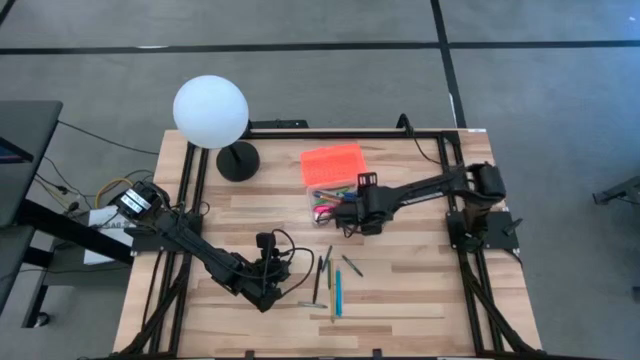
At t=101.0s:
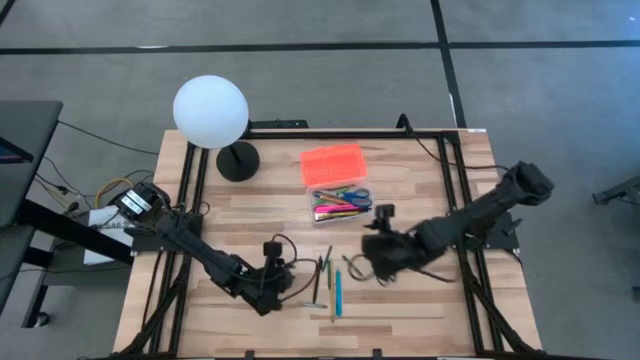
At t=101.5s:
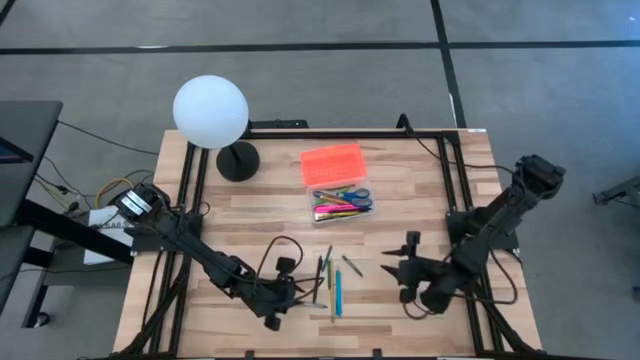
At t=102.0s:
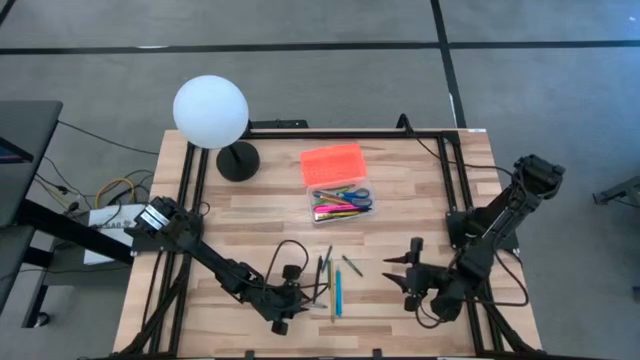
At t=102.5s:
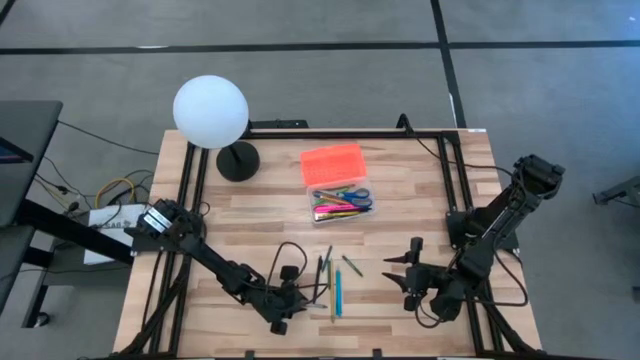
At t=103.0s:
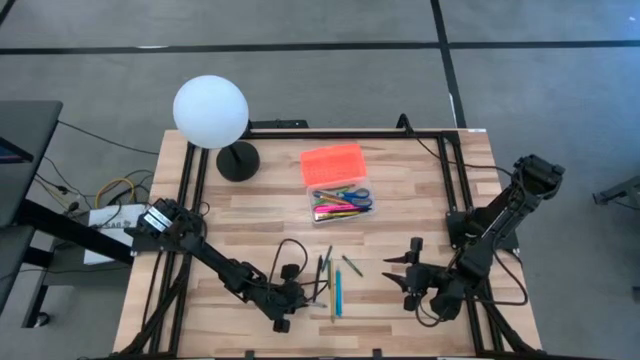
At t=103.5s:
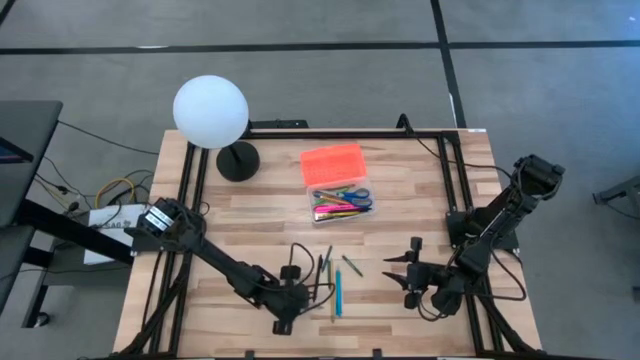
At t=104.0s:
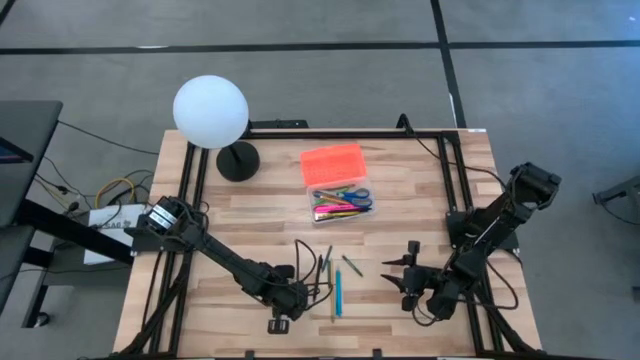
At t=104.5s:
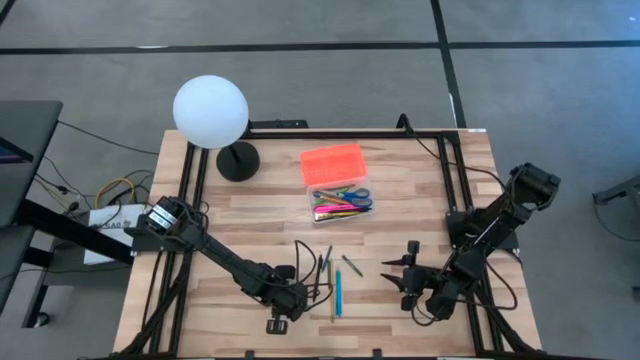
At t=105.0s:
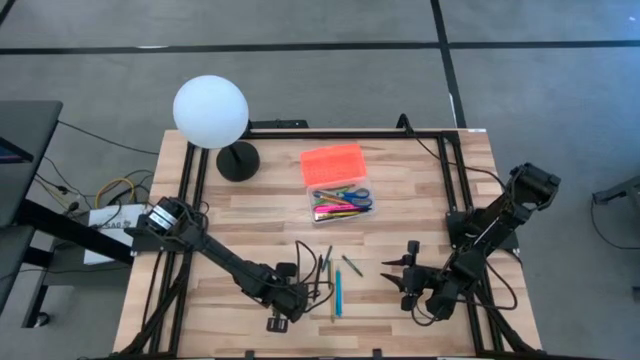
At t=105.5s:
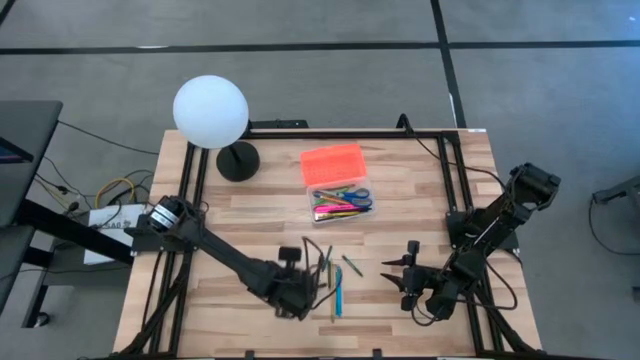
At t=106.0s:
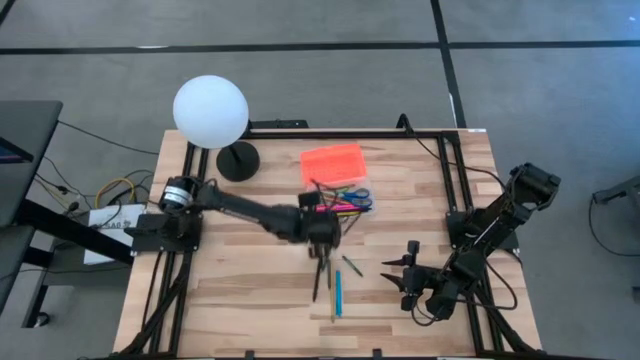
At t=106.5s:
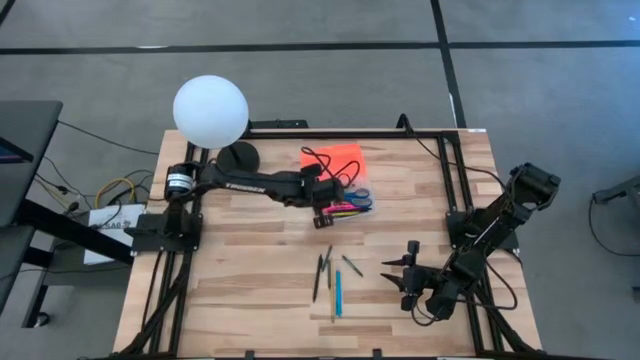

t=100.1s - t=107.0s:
Task: Pick & place school supplies into a supply box
Put the gray crayon into the orange supply box

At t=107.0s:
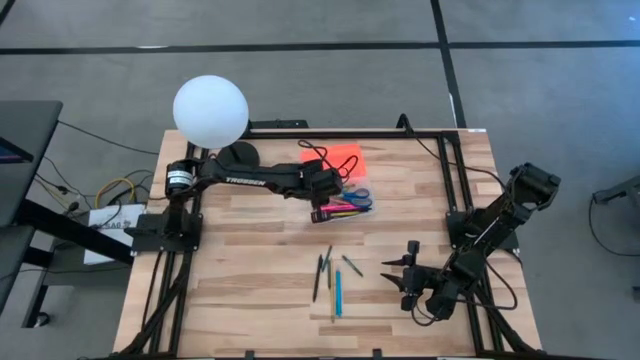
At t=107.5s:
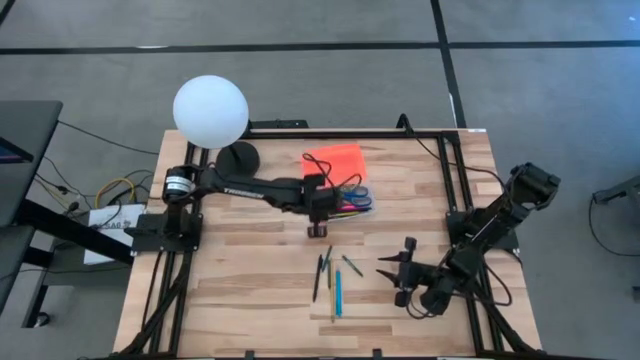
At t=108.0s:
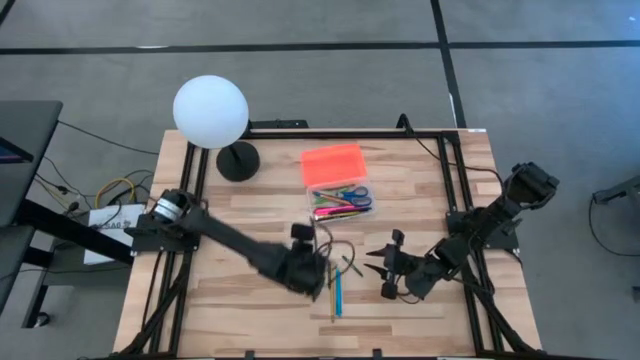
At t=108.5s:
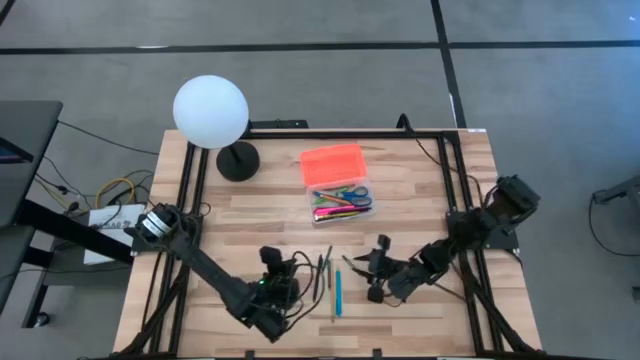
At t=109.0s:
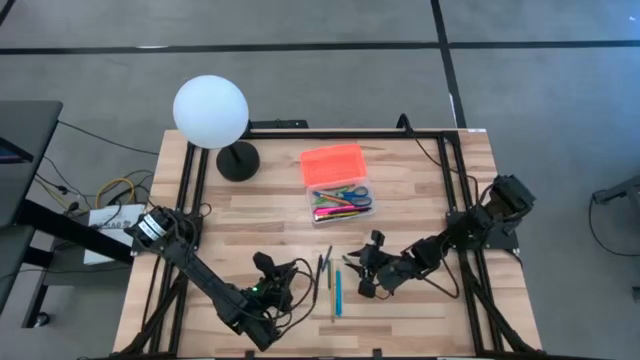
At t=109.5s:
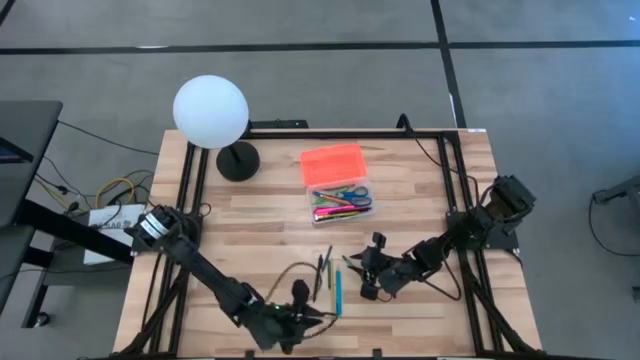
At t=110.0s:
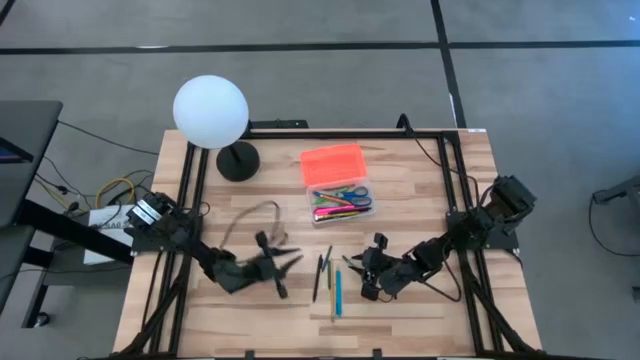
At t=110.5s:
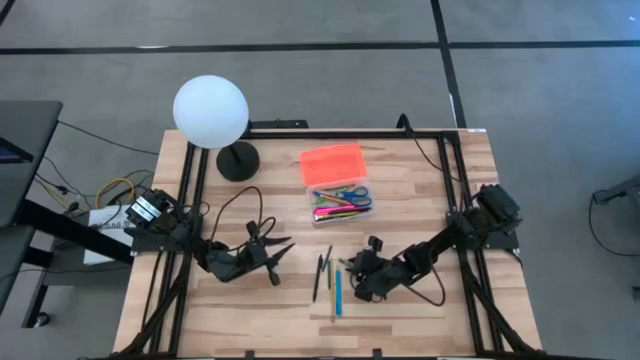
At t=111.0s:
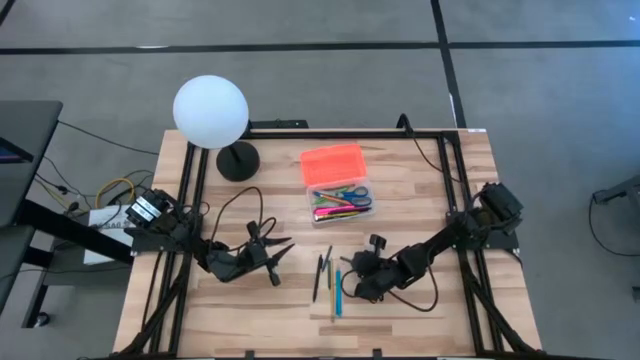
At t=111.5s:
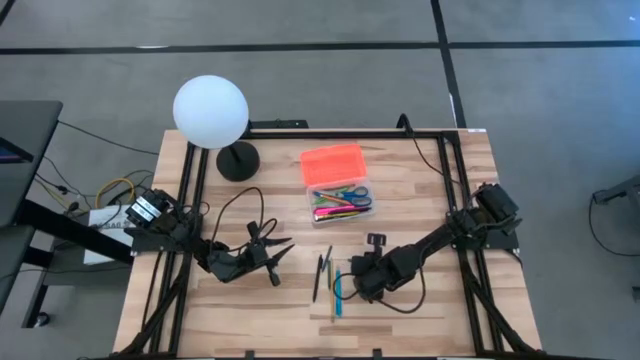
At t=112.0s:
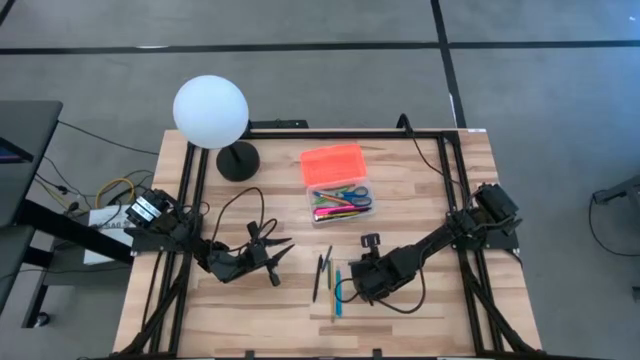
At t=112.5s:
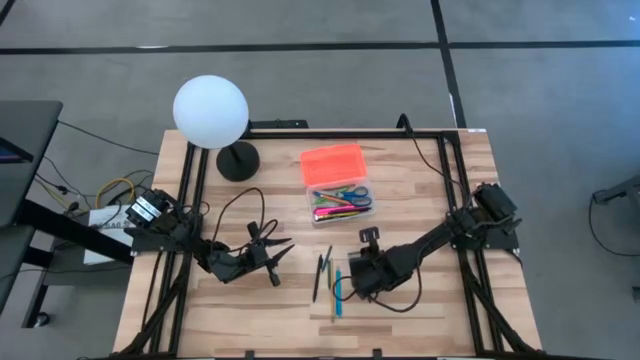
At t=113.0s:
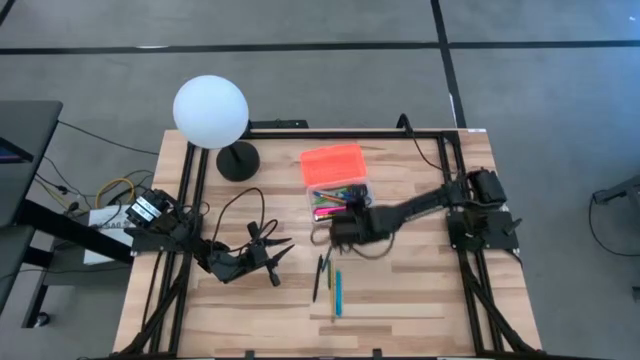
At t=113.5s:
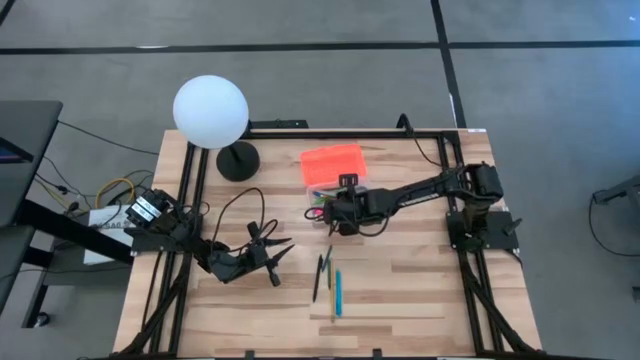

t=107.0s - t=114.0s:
Put the green crayon into the orange supply box

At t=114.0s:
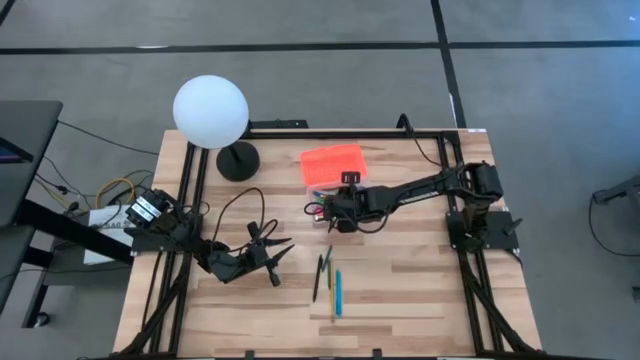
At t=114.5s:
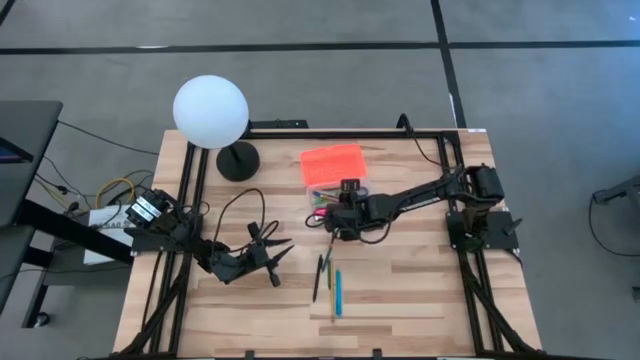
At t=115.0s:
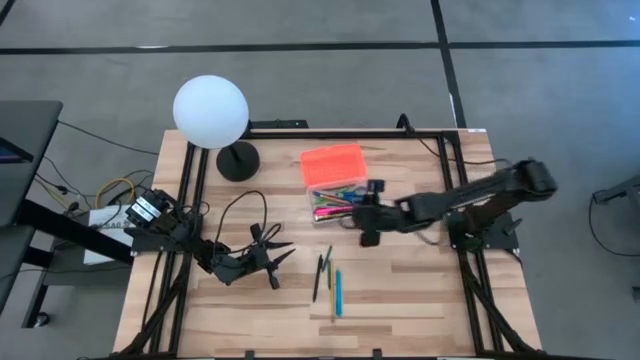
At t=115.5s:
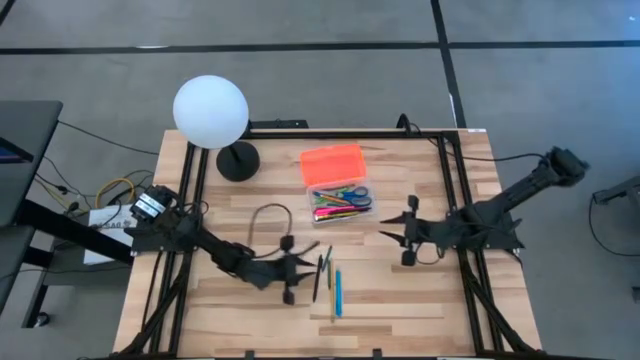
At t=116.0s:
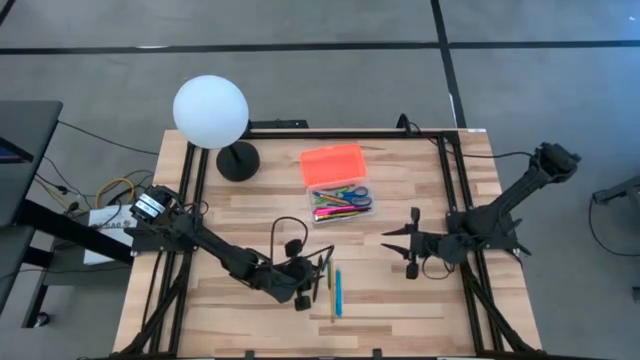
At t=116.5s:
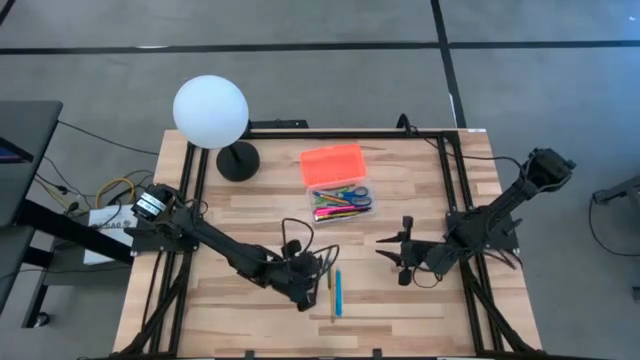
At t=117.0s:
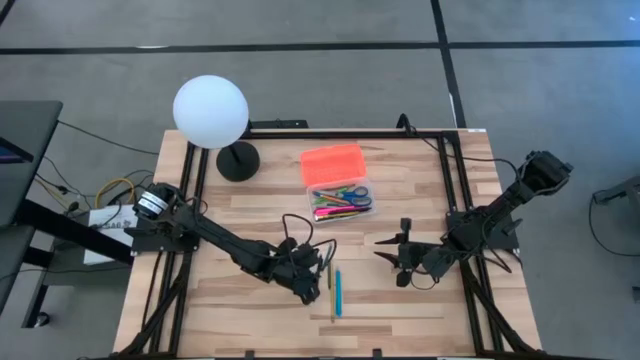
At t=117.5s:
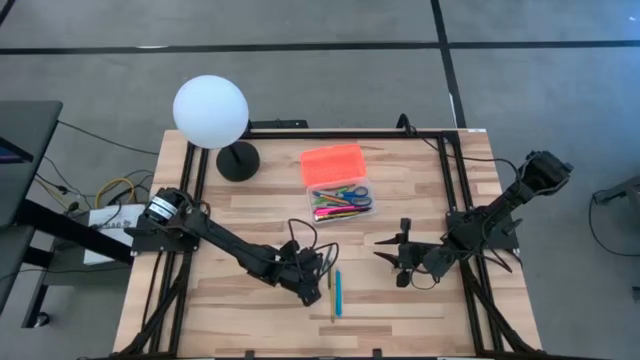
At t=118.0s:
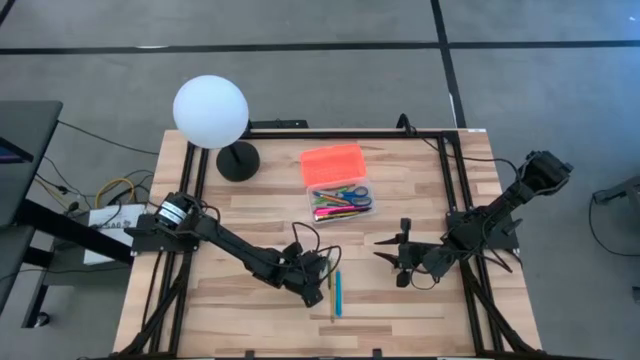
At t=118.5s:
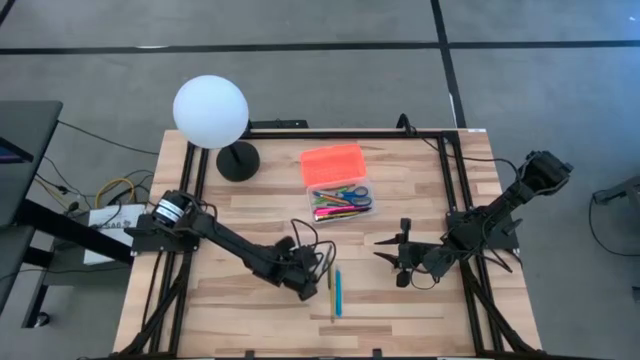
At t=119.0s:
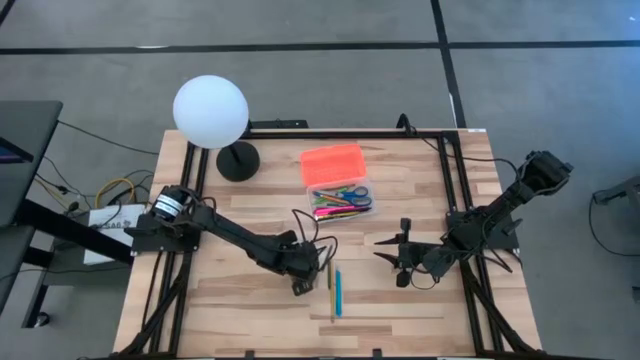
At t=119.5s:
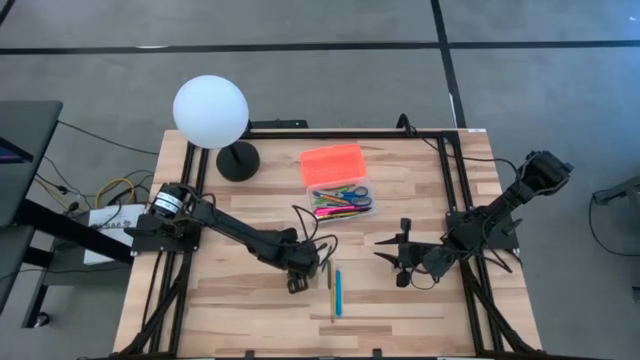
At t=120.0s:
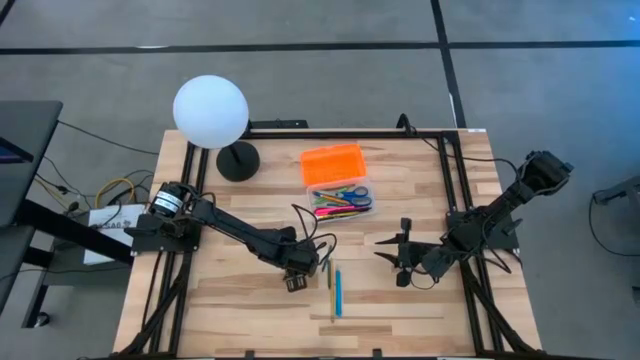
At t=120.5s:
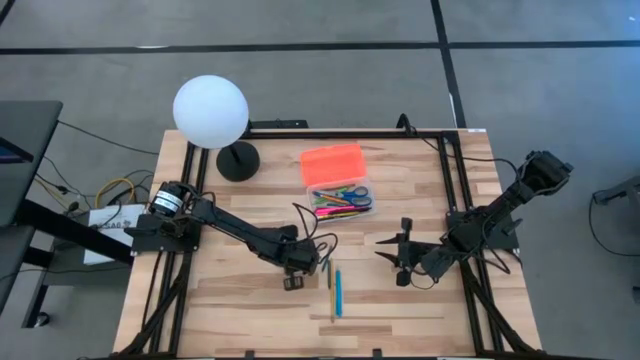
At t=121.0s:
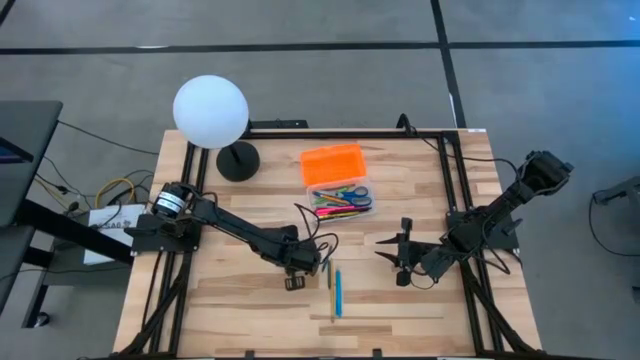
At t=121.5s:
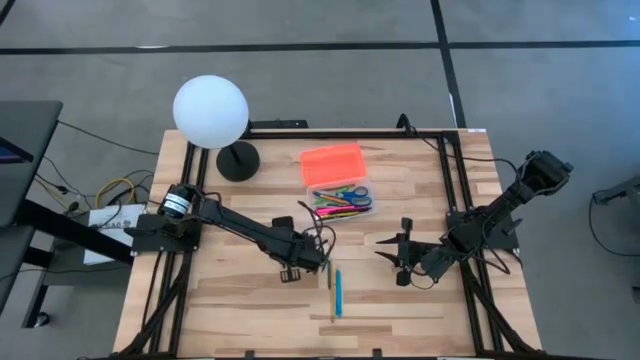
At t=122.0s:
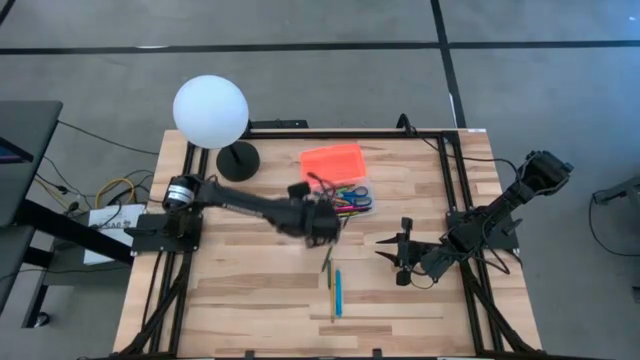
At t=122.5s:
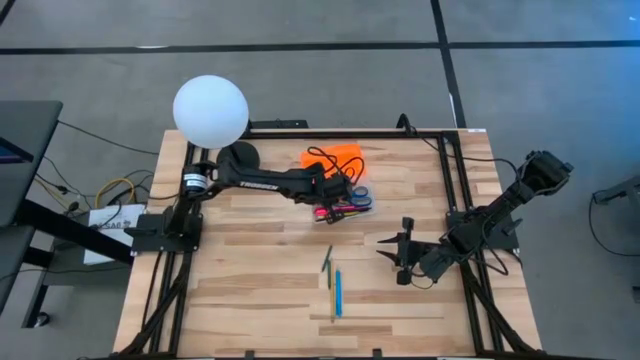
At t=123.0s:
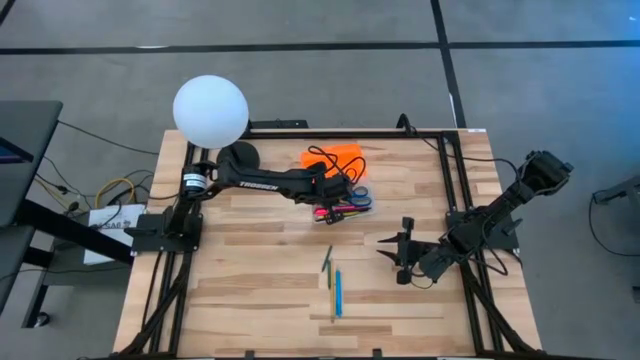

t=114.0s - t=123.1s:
Put the black pen into the orange supply box
